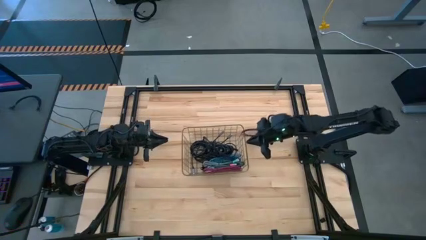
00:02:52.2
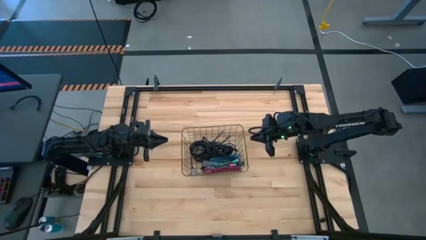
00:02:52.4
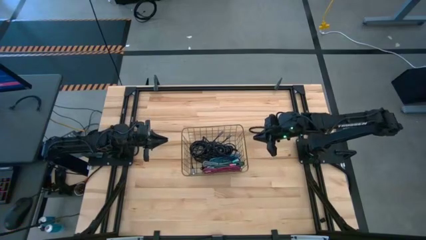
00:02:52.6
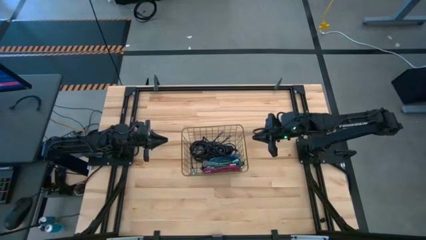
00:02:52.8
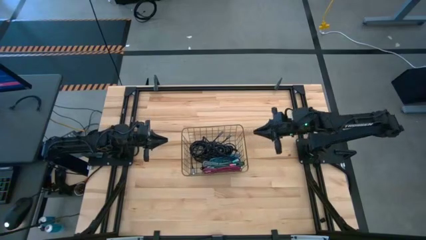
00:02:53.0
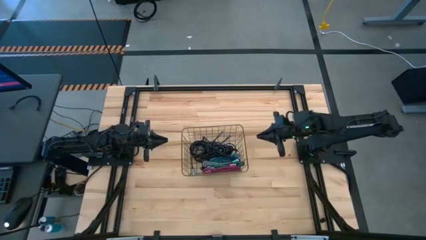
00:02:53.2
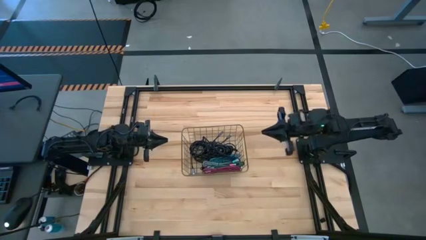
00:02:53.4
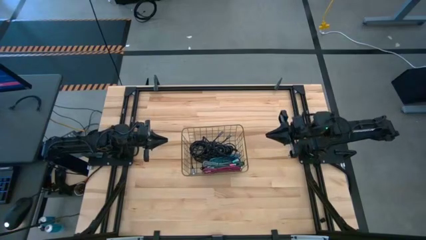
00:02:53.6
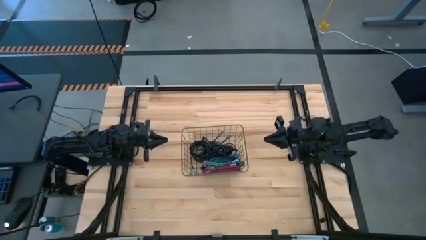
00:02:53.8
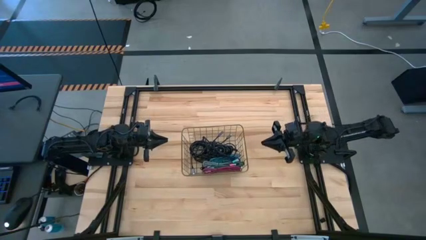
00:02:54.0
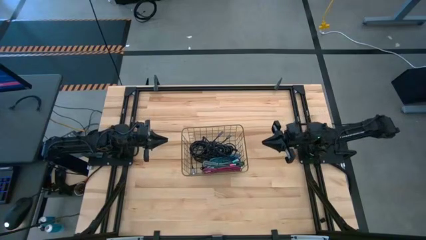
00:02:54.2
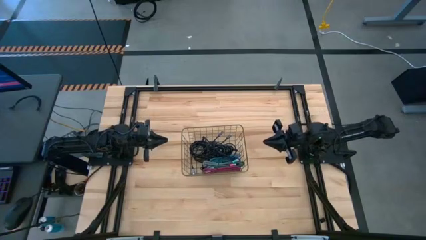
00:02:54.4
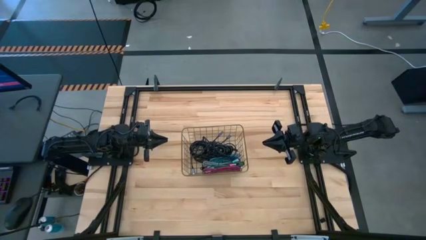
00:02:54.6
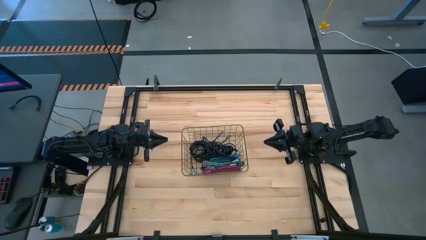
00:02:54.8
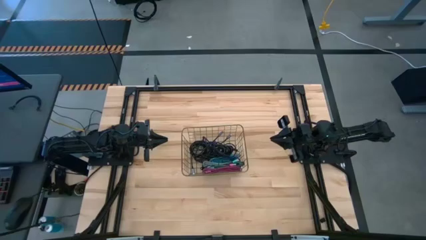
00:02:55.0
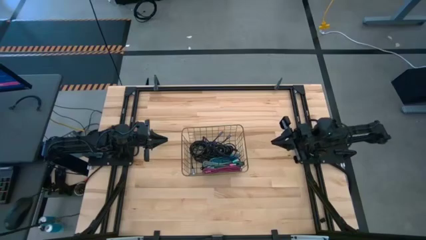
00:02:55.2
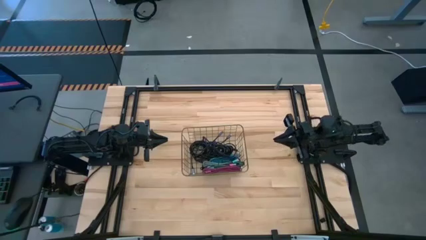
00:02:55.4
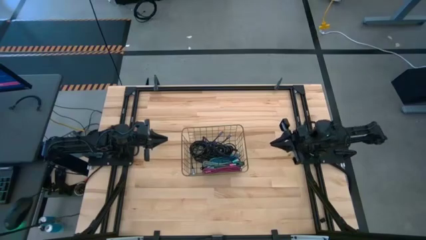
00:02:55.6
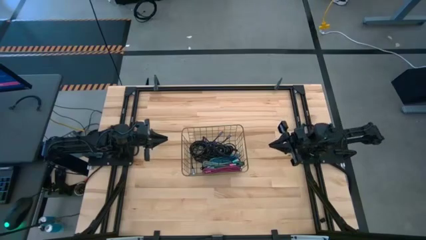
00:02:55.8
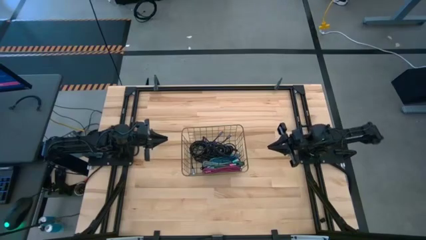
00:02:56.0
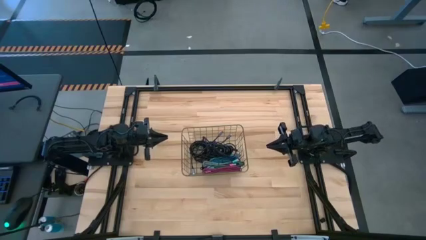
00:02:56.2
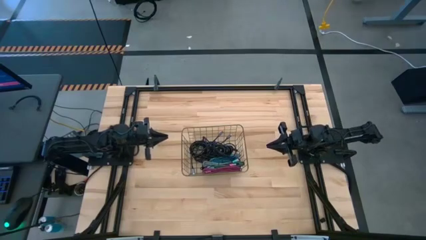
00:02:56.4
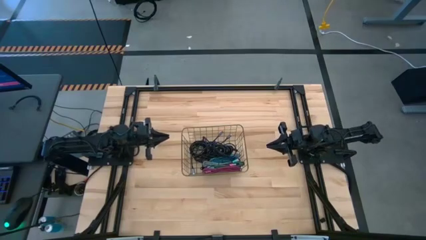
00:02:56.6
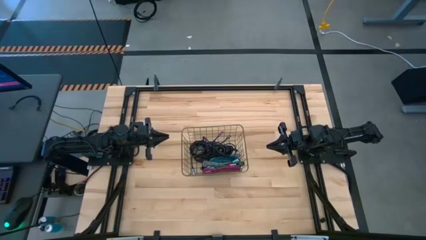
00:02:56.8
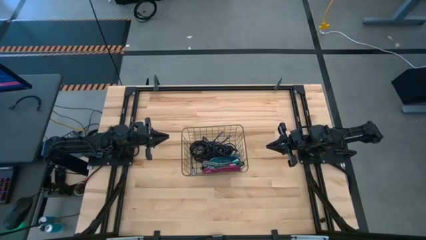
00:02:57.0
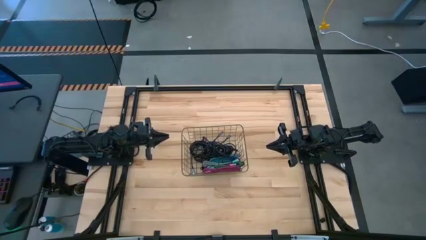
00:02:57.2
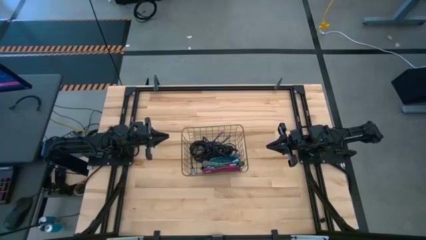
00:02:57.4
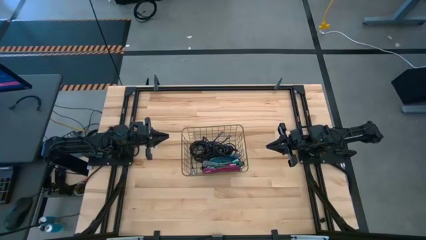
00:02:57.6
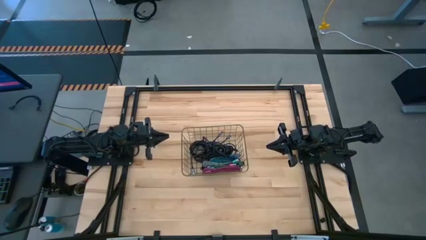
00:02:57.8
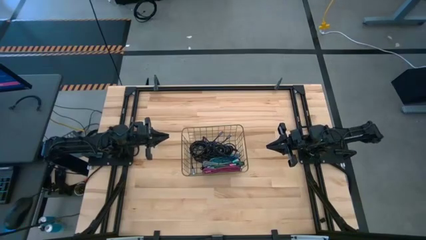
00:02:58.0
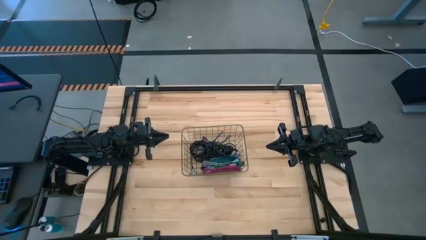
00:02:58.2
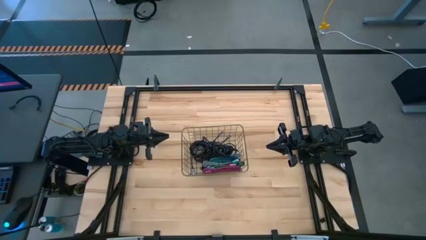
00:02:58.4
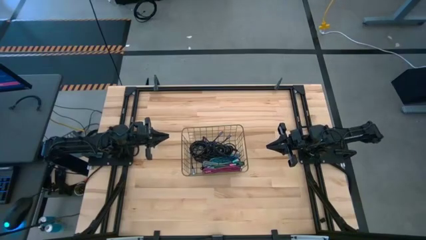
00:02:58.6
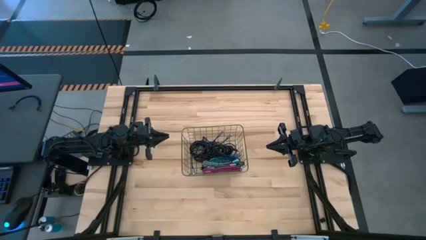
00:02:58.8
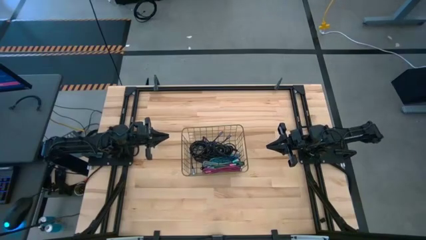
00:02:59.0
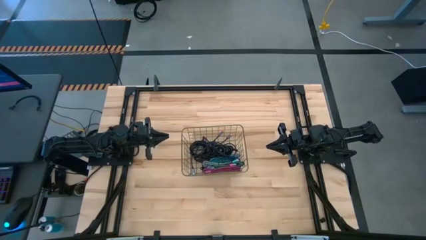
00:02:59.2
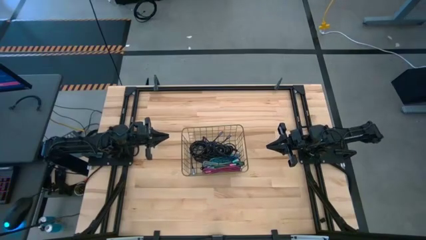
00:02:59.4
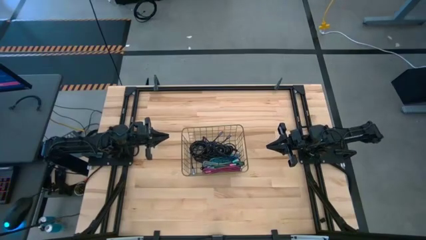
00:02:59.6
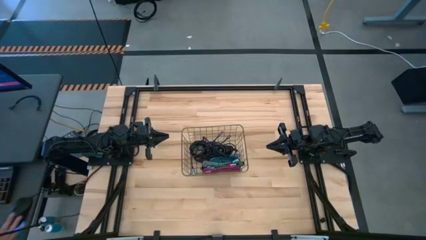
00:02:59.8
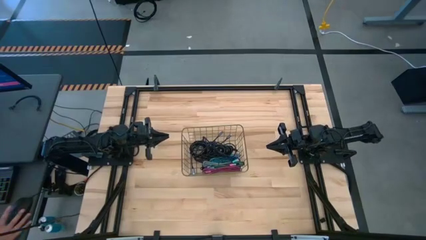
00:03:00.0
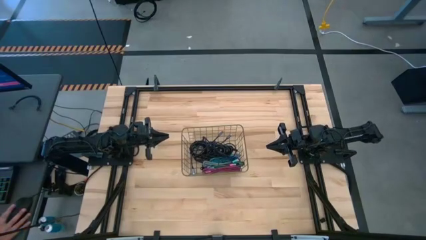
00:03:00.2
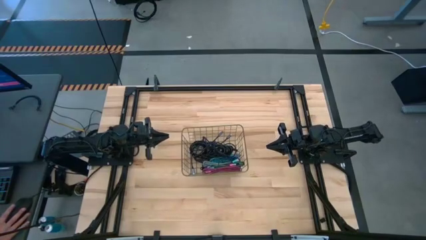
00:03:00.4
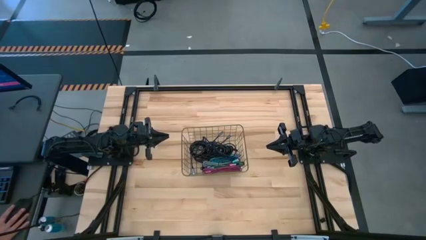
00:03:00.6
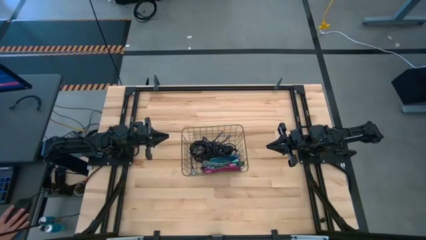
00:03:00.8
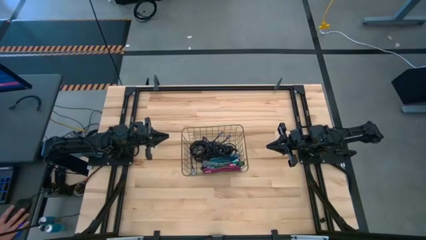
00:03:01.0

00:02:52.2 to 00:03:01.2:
Task: Pick and place USB-C Cables
Return to Home Position

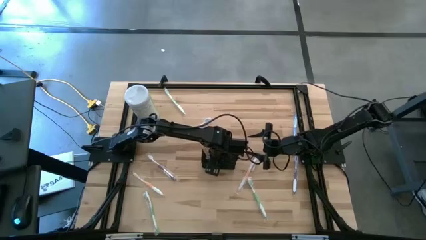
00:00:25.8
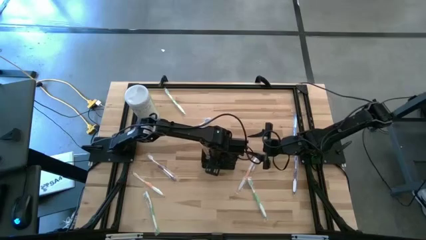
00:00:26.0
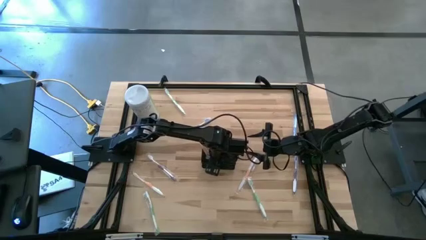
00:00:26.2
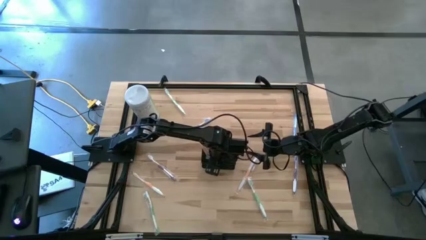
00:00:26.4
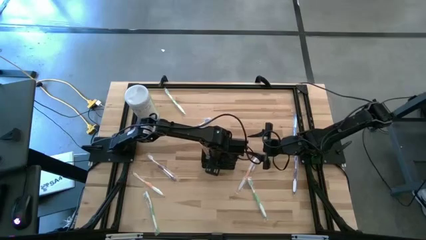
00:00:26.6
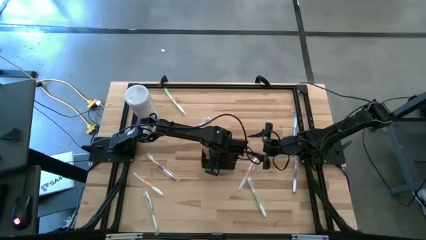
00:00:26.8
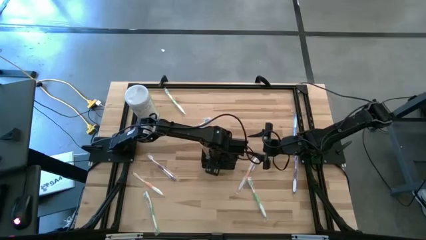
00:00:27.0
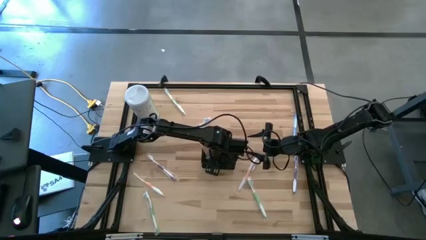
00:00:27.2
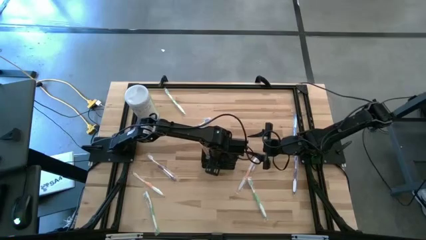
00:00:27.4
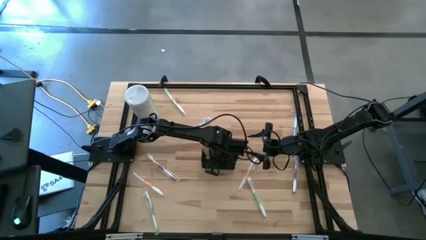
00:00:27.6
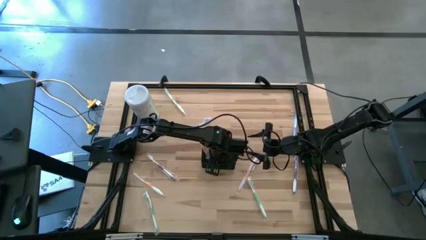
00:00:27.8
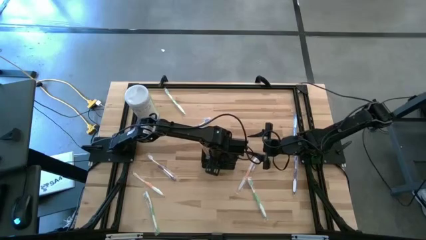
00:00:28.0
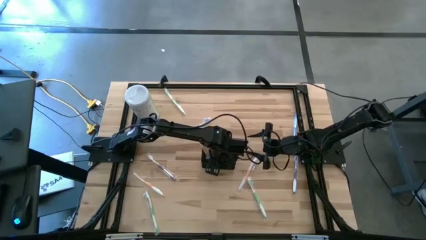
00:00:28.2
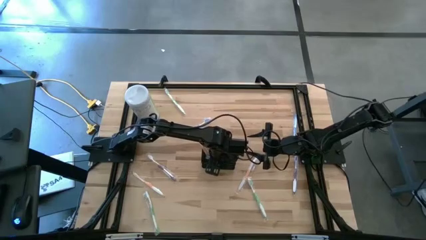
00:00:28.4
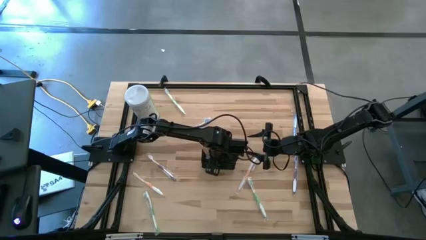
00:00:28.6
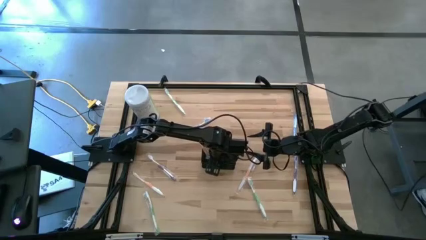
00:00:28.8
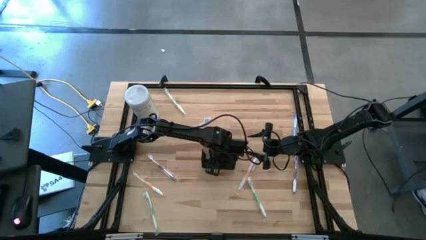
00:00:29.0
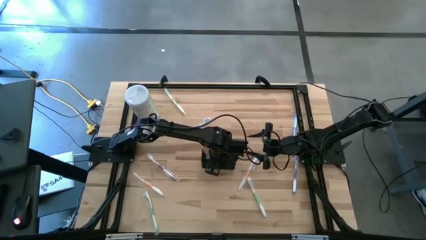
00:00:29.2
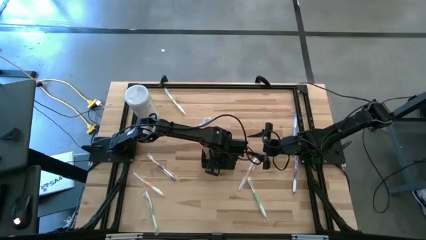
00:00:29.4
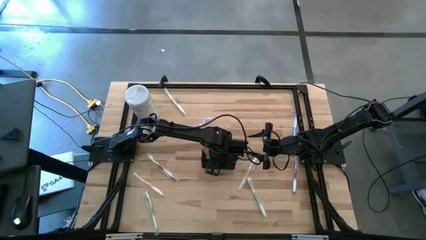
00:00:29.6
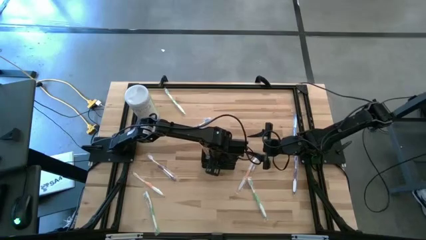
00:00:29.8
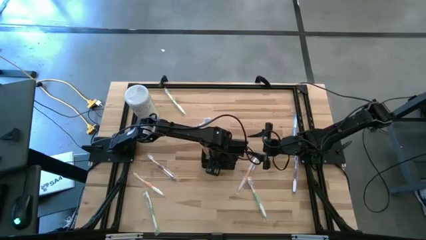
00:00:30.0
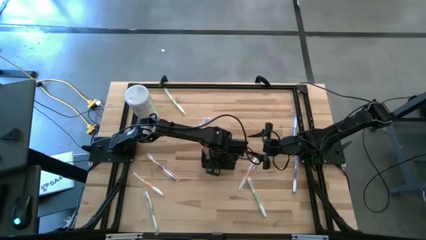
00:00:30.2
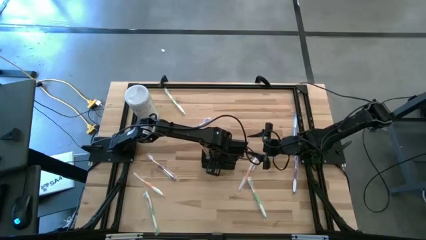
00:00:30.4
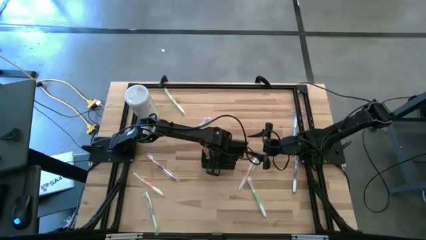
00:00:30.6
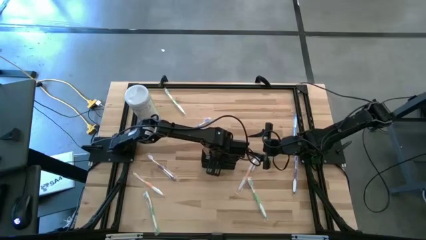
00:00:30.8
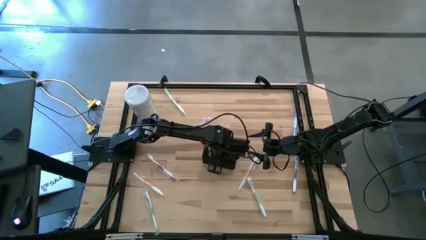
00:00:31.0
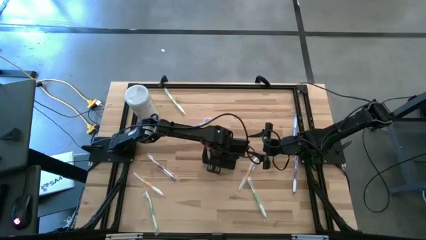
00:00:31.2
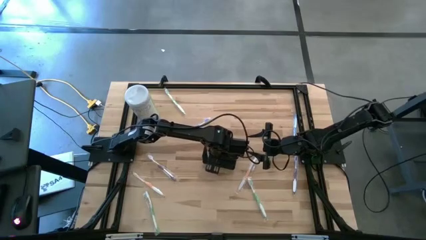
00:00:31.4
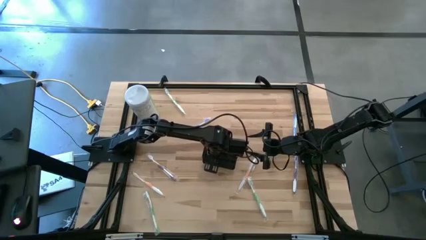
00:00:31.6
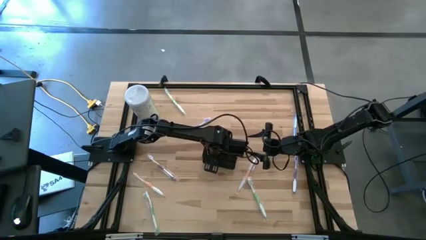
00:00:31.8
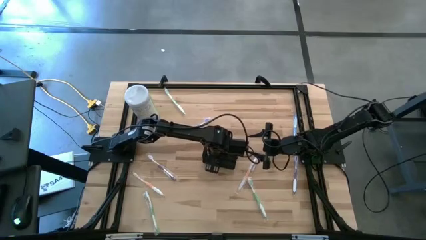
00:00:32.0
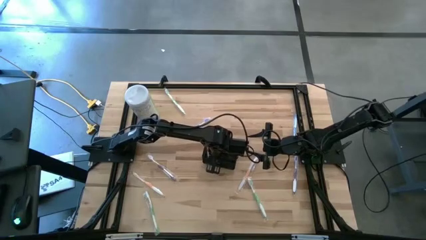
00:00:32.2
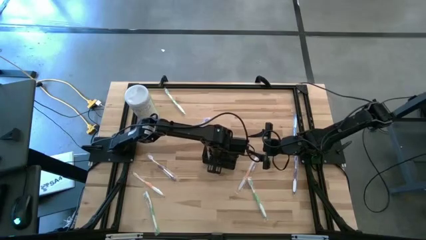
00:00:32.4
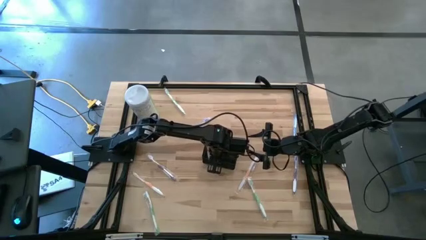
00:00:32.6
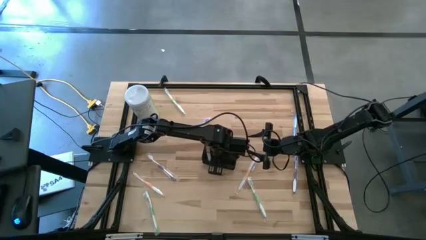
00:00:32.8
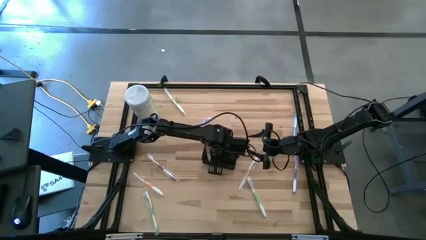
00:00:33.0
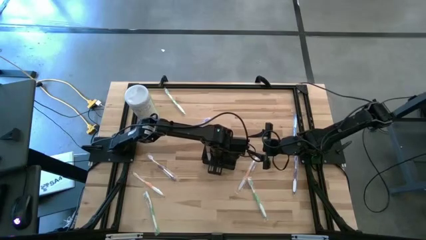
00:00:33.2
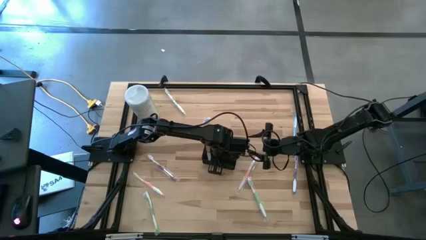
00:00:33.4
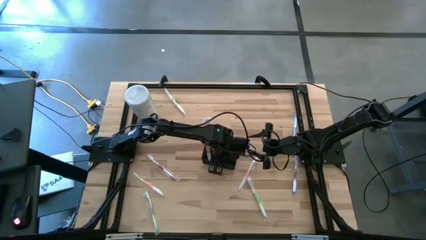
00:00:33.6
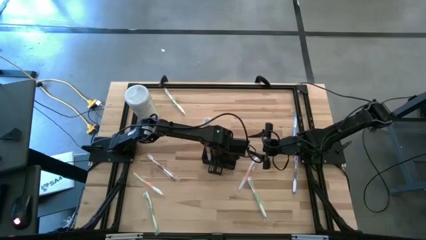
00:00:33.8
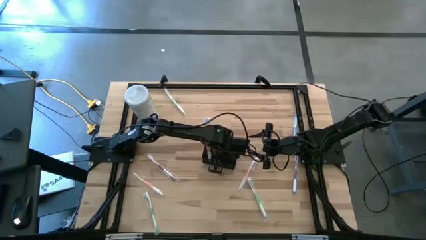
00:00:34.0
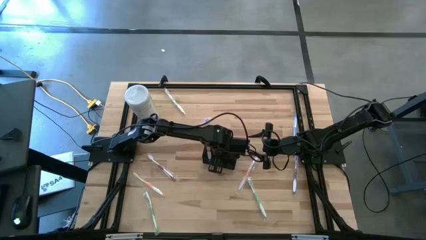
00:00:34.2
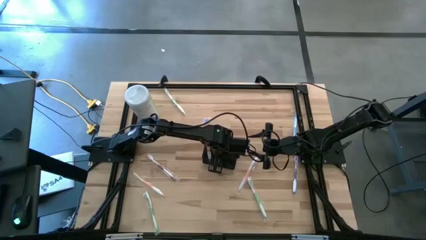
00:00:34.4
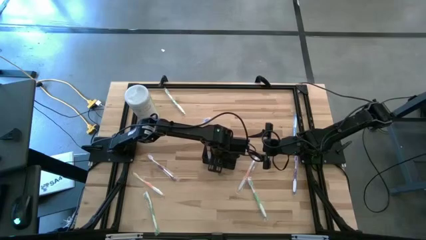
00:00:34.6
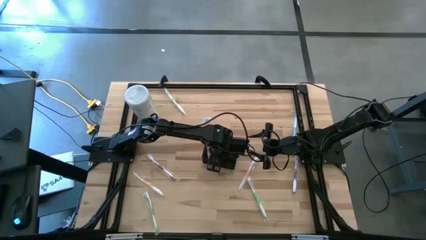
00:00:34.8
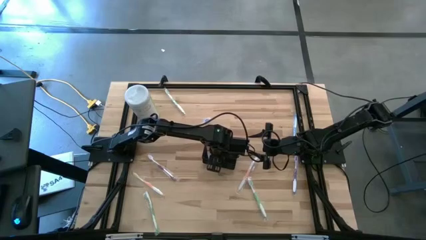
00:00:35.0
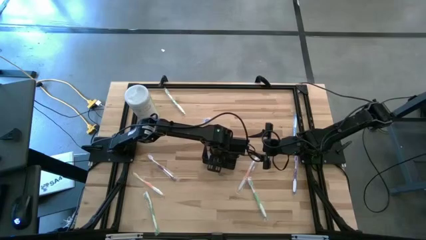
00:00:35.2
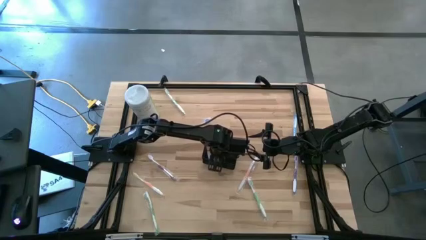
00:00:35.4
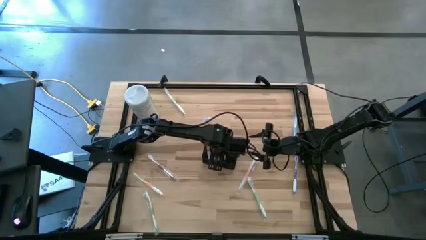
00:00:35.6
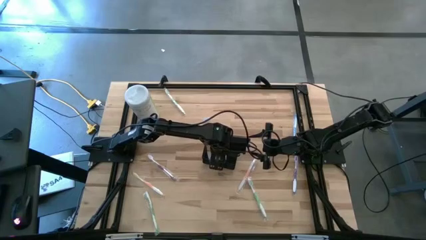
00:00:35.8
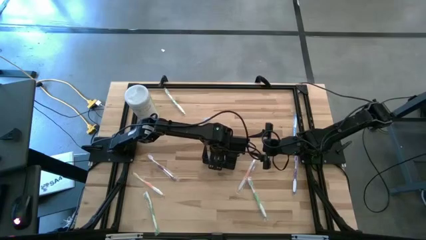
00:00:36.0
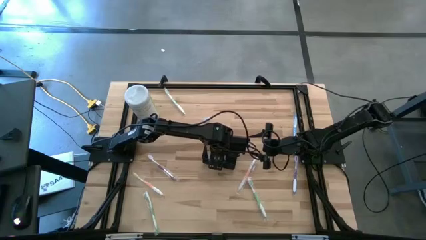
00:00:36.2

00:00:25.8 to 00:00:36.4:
Task: Pick & Place toothbrushing station
Put the left blue mouthwash bottle into the mesh organizer
